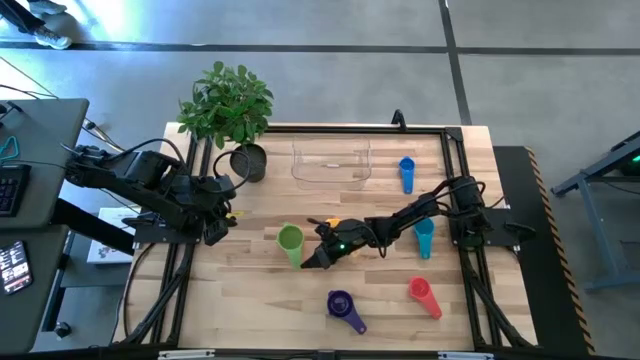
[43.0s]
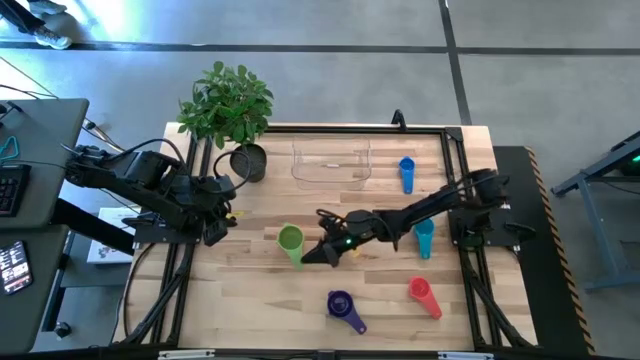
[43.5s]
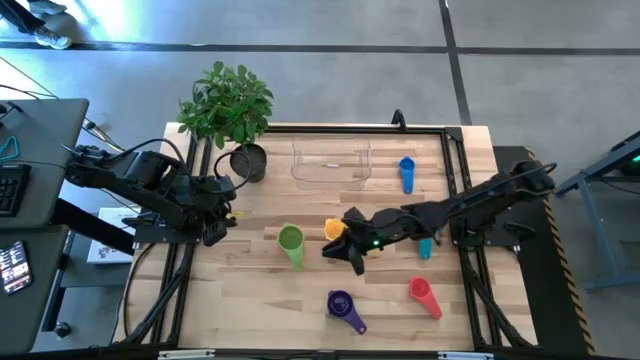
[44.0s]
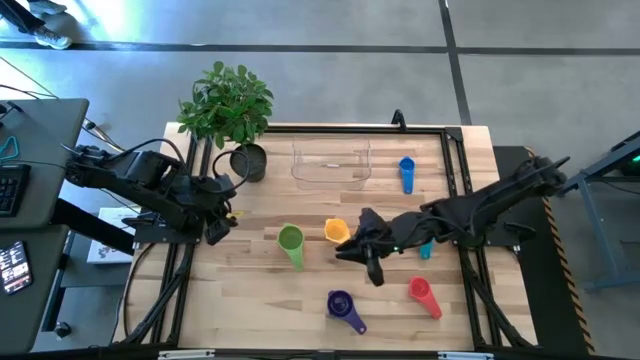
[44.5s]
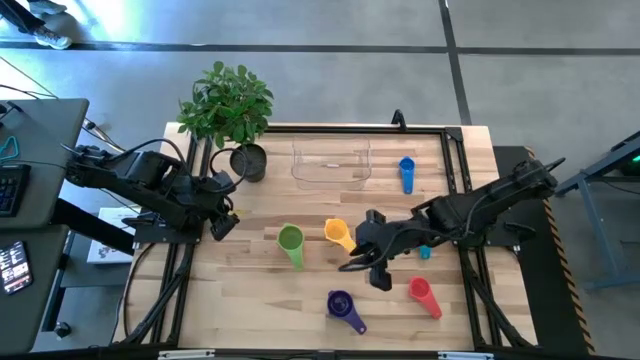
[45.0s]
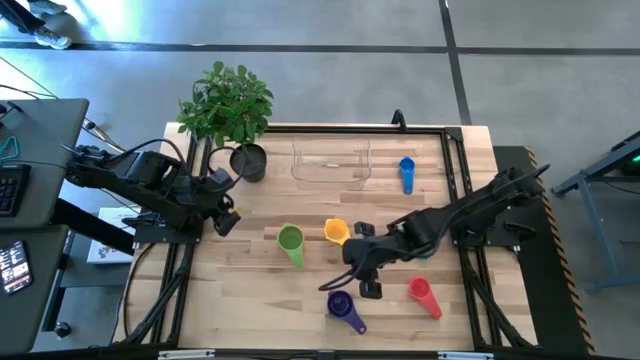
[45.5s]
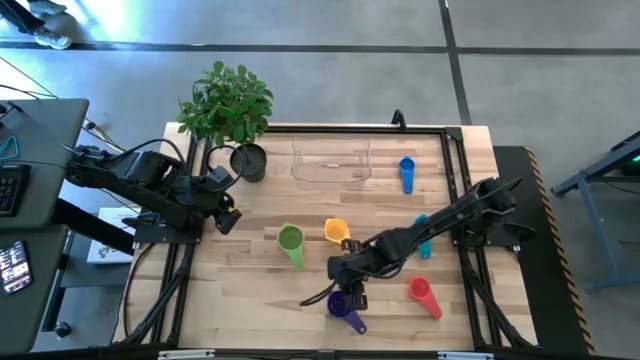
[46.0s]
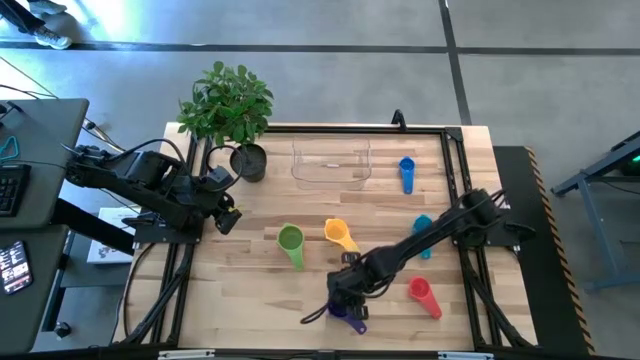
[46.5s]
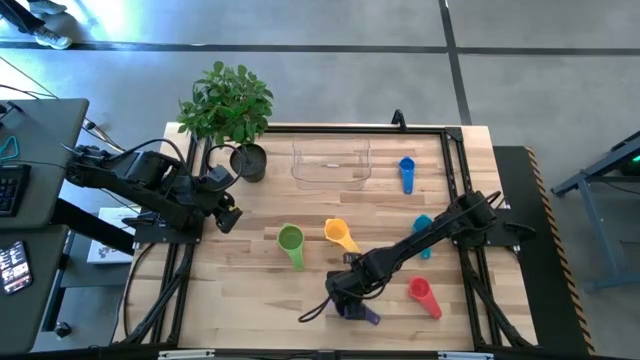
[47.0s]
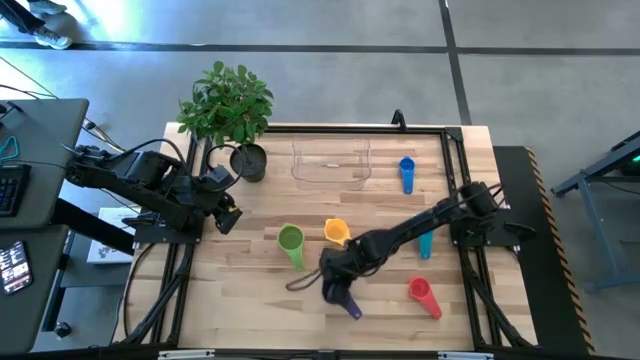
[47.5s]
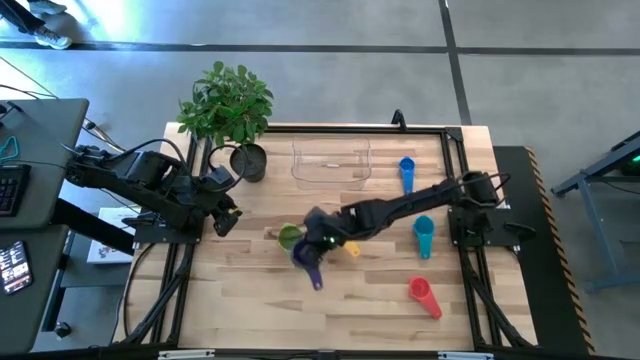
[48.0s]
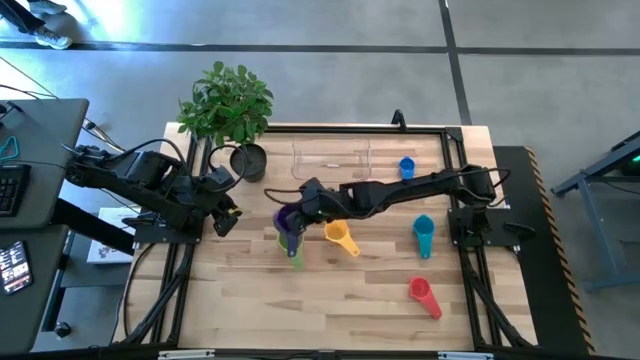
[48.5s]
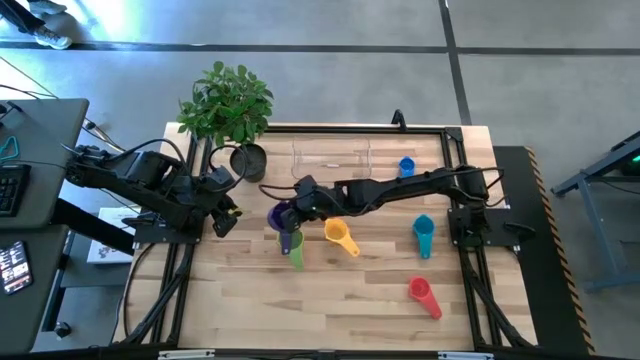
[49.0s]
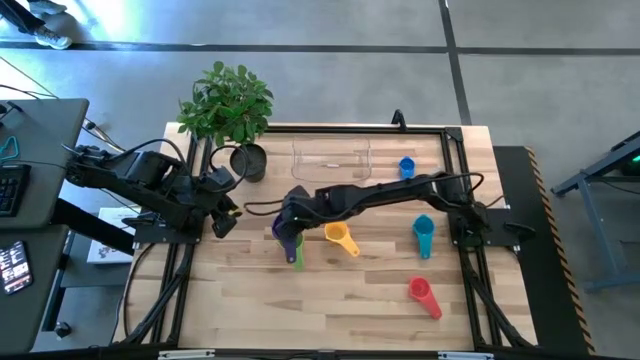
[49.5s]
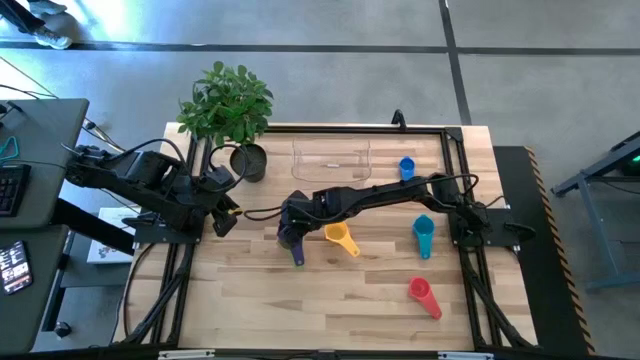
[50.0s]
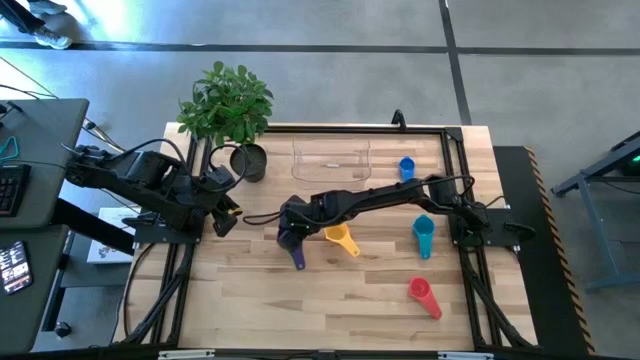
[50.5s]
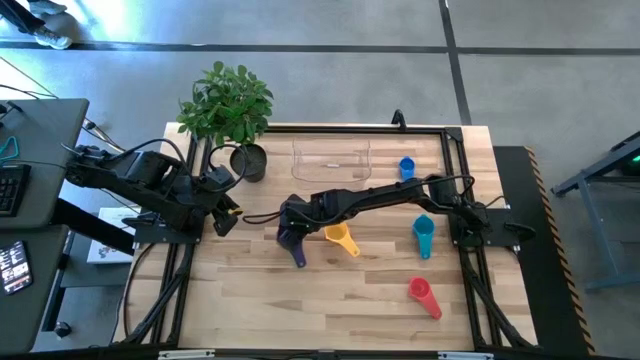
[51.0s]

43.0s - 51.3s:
Task: Nest measuring cups in basket
Stack the dark blue measuring cup on top of the green measuring cup

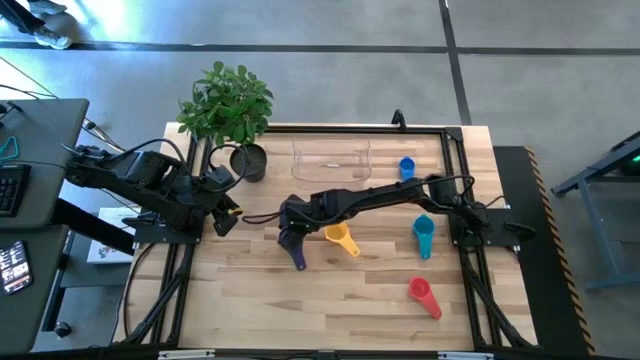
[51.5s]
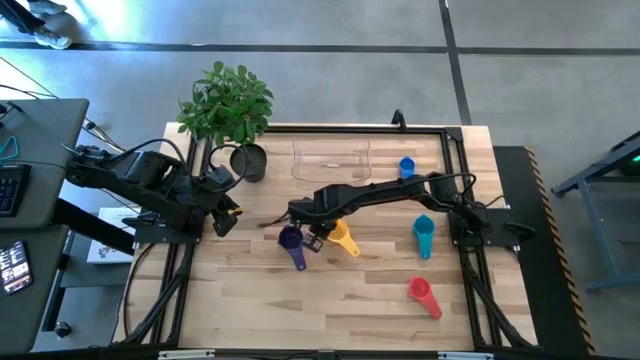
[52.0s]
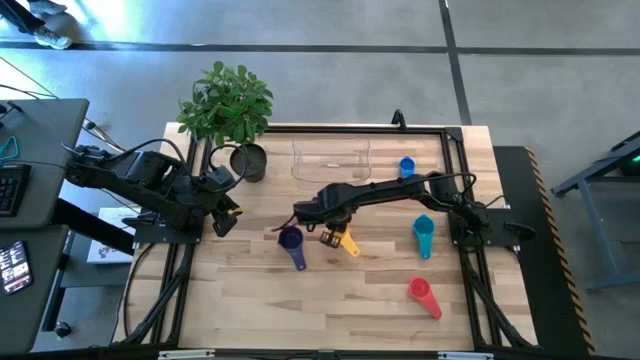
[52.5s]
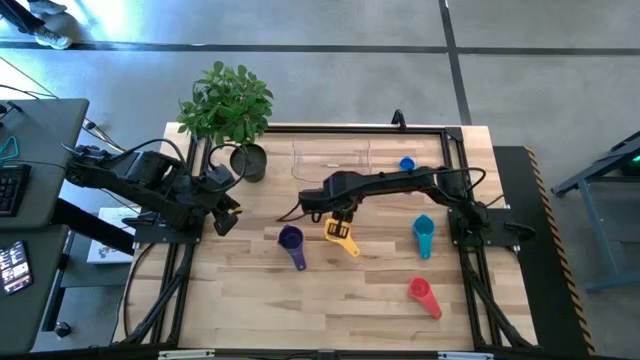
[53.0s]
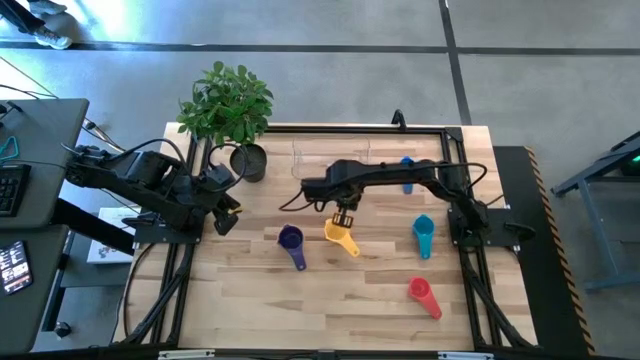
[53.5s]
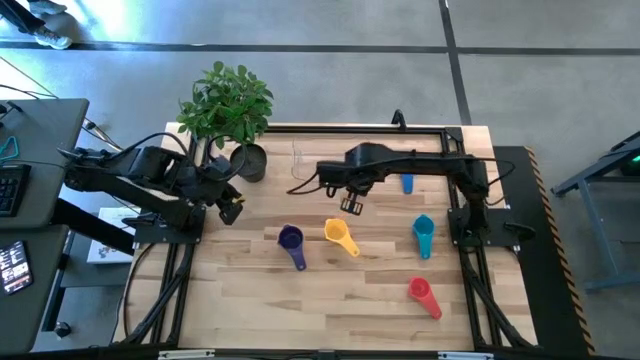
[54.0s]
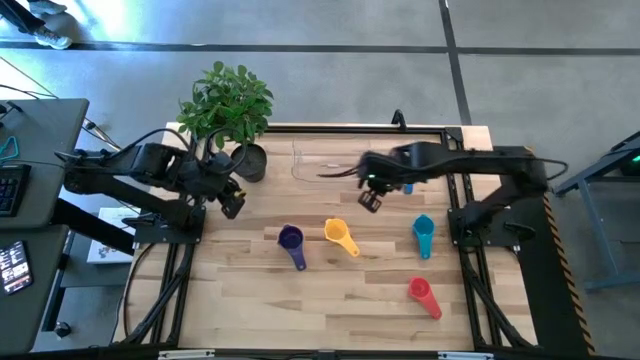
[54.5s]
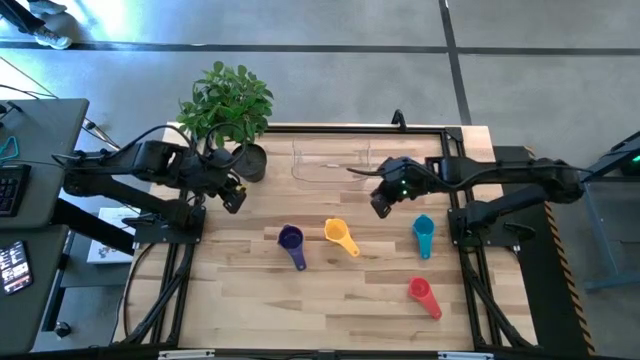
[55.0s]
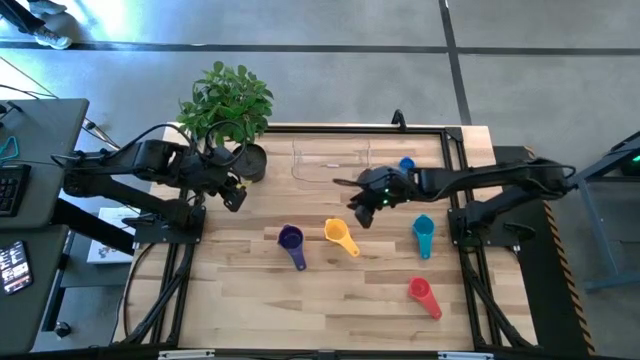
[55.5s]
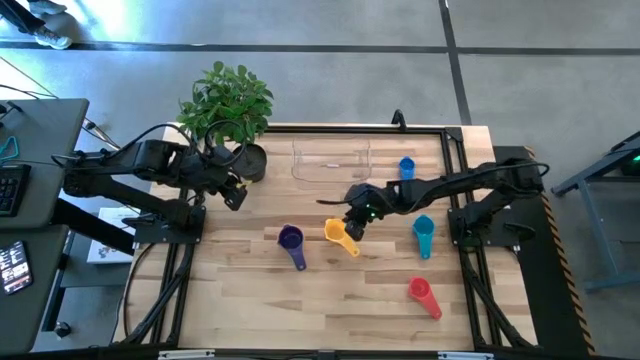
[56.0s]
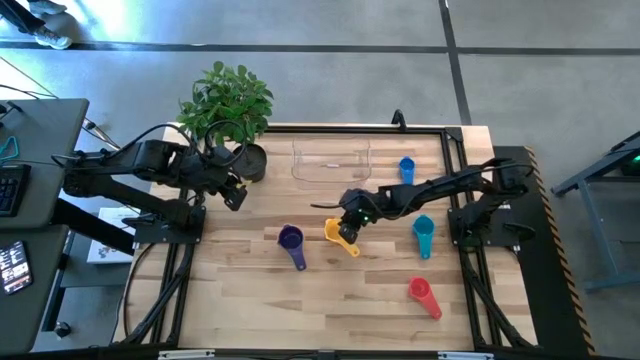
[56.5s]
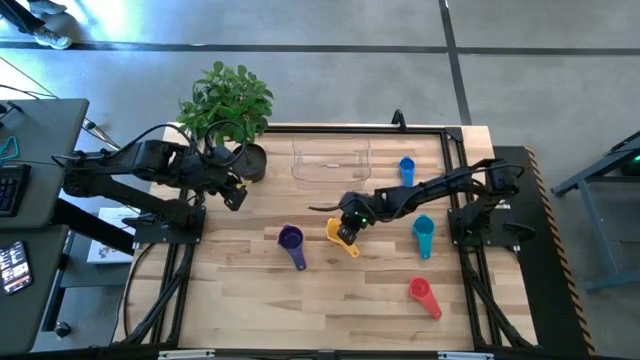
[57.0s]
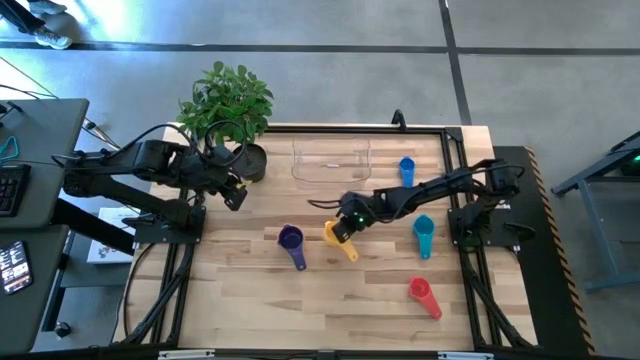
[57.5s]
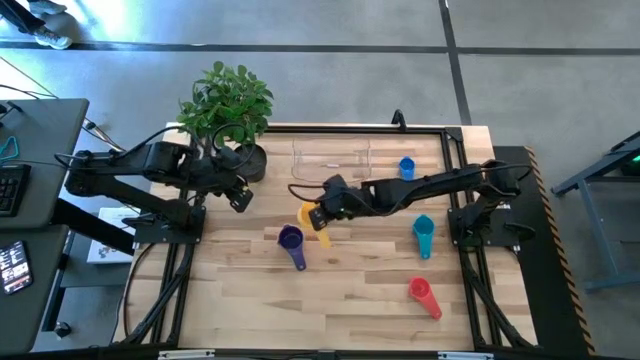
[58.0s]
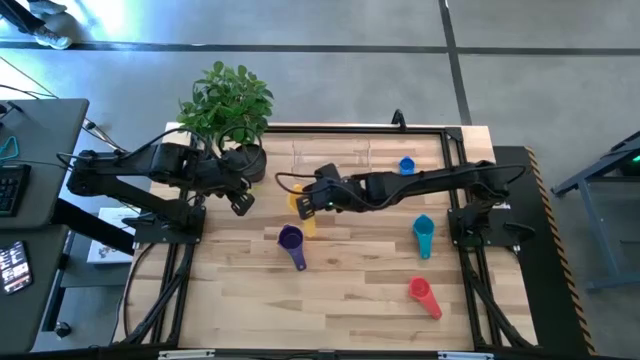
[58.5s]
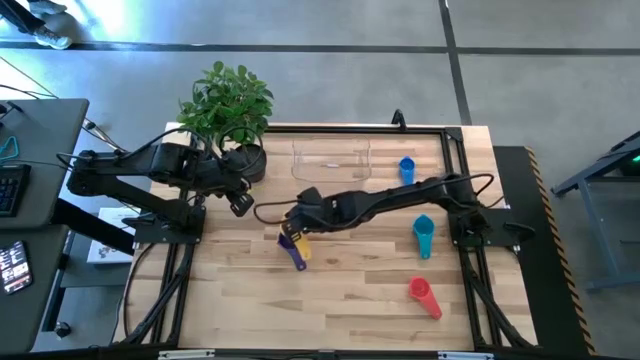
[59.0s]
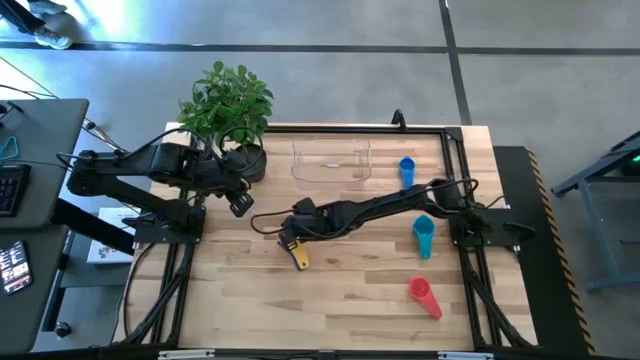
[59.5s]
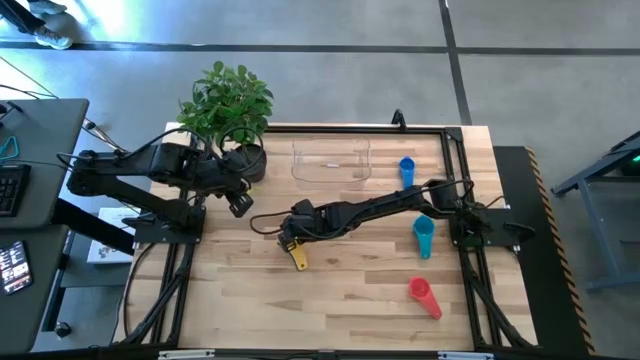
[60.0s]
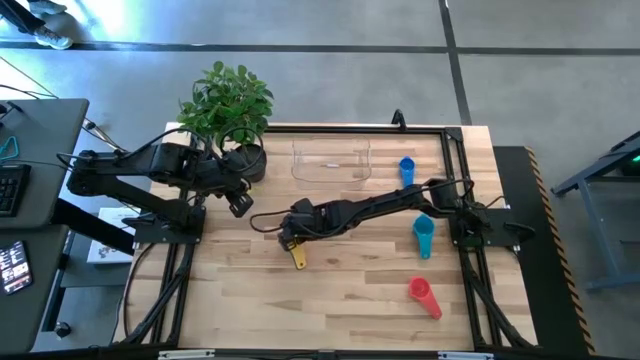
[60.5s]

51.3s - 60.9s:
Stack the yellow measuring cup on top of the dark blue measuring cup

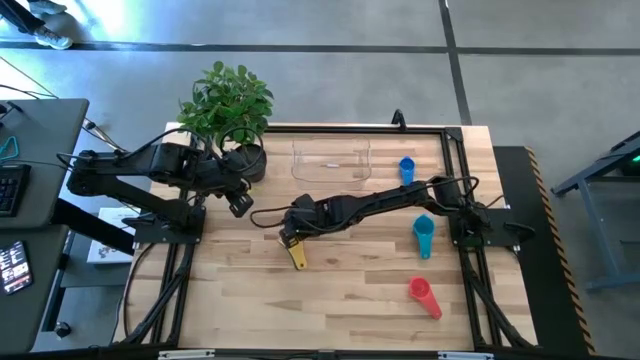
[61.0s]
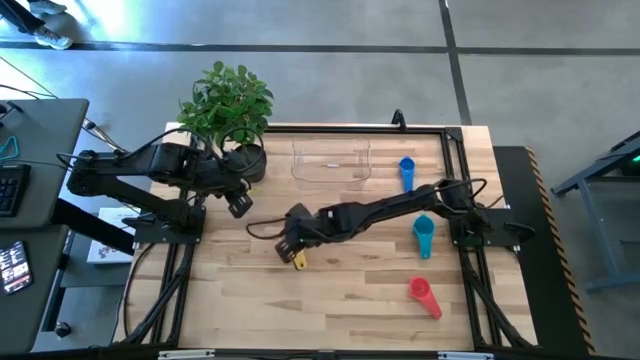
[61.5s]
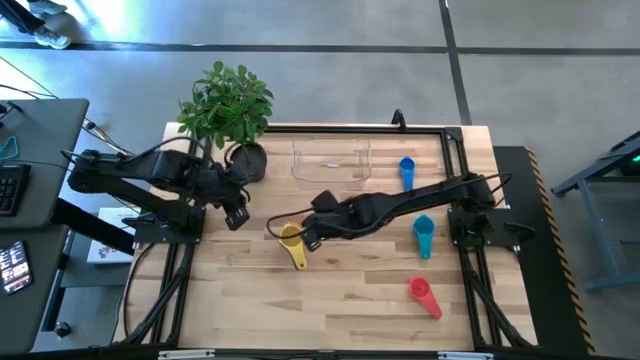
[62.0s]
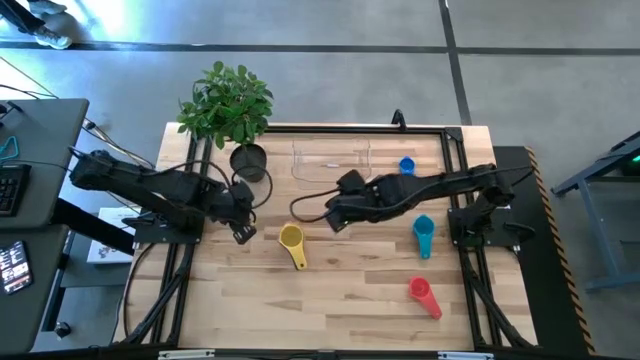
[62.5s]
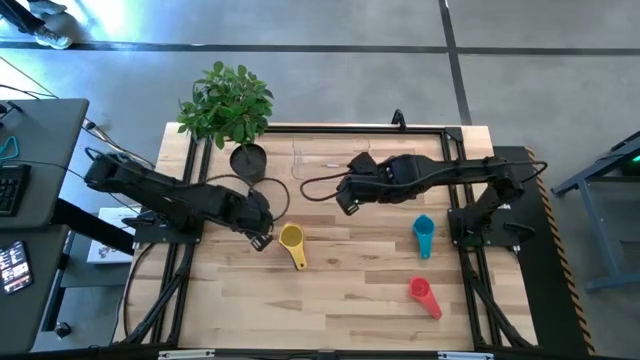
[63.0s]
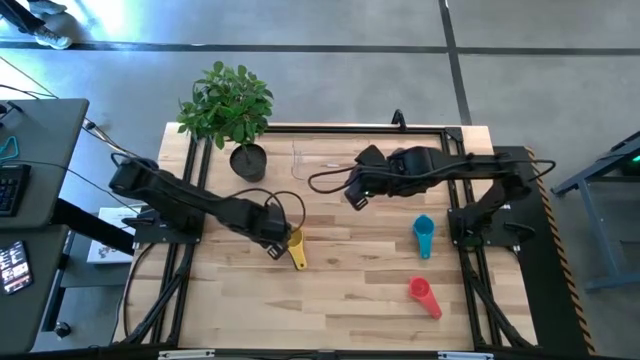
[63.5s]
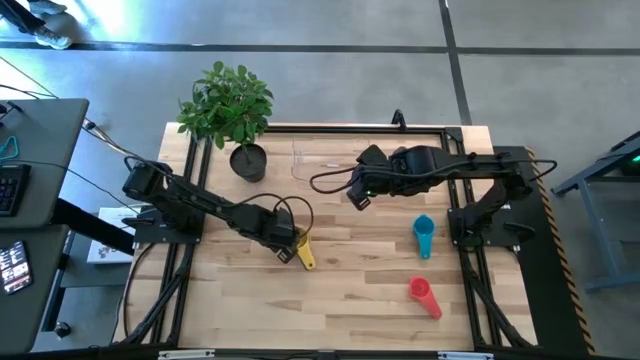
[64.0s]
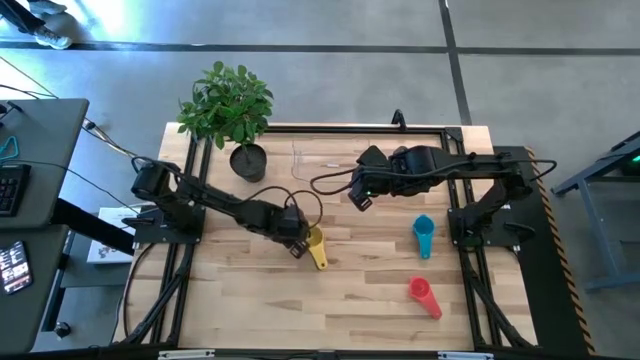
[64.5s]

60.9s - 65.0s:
Move the stacked measuring cups to the center of the table
